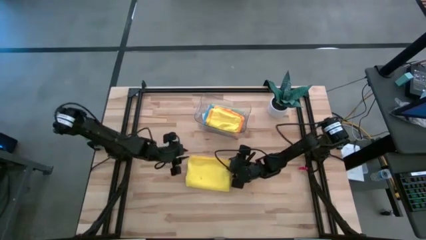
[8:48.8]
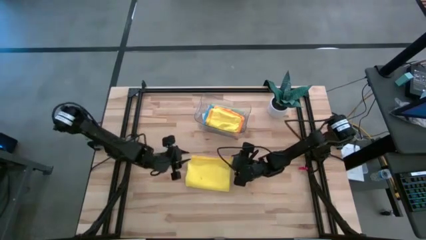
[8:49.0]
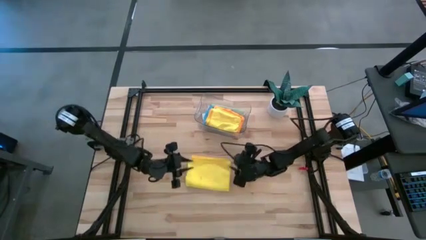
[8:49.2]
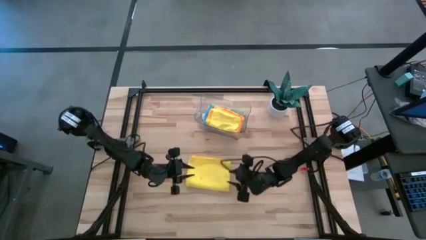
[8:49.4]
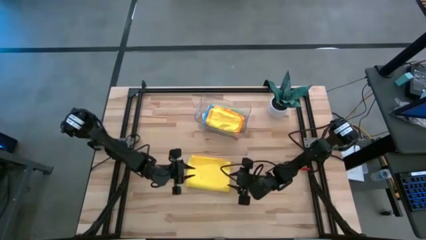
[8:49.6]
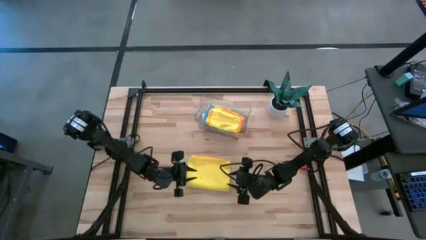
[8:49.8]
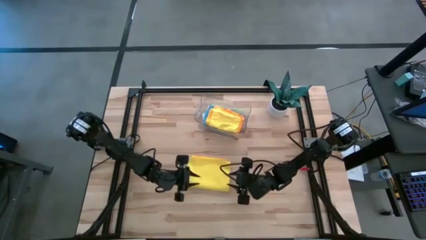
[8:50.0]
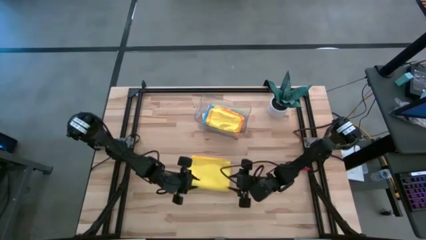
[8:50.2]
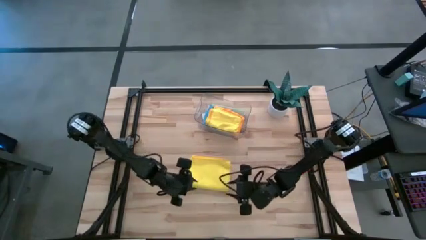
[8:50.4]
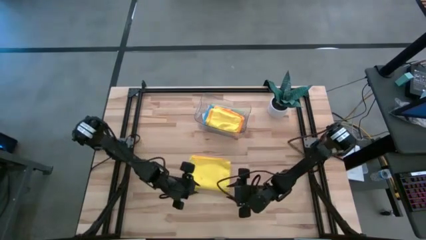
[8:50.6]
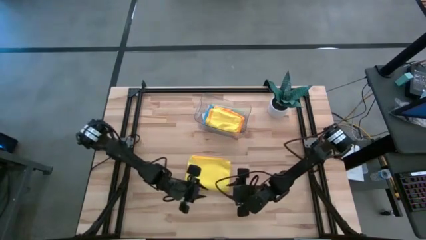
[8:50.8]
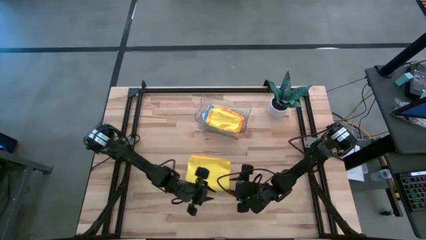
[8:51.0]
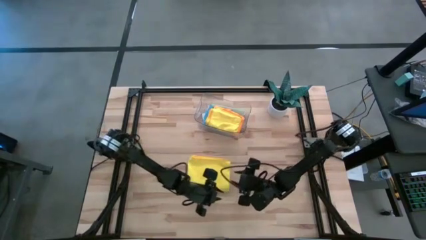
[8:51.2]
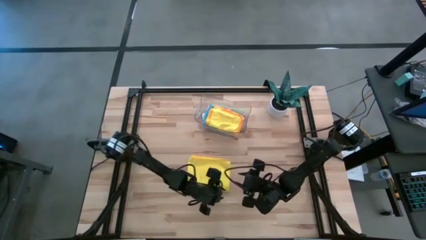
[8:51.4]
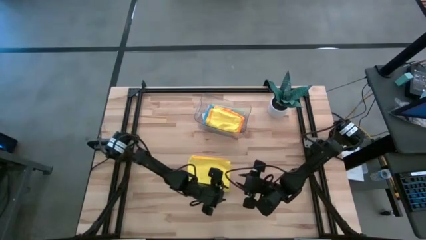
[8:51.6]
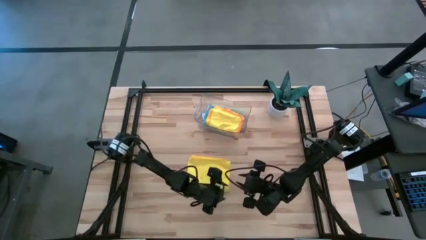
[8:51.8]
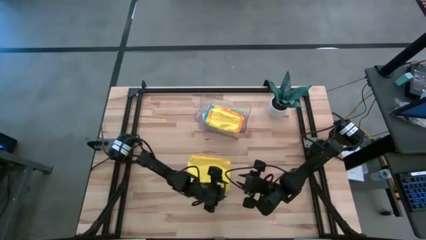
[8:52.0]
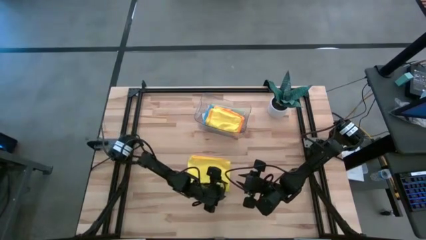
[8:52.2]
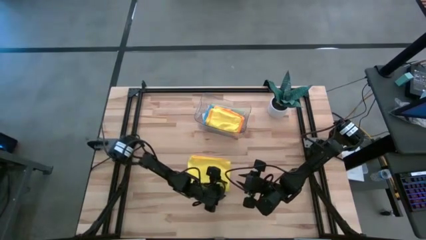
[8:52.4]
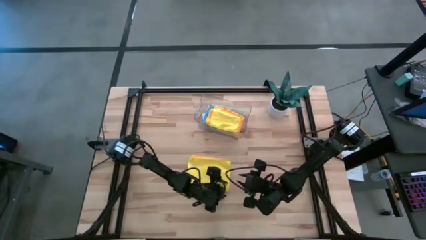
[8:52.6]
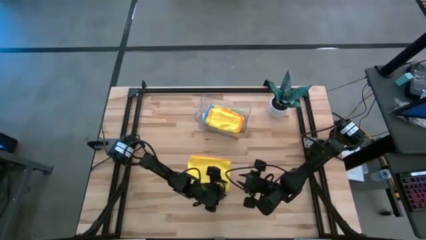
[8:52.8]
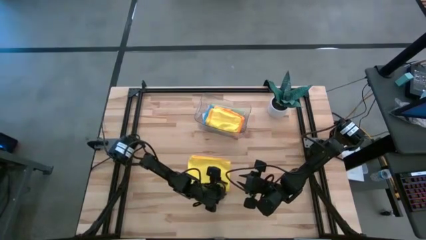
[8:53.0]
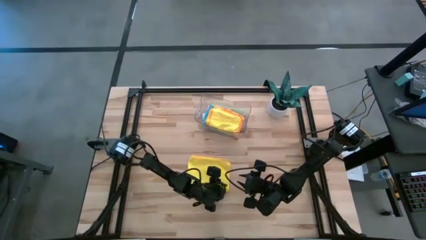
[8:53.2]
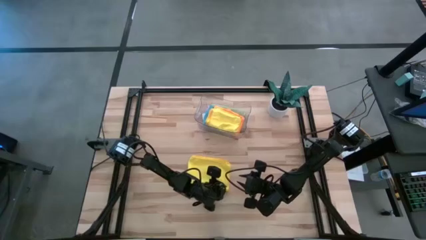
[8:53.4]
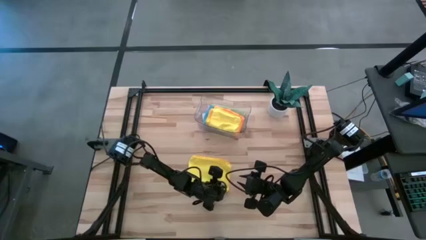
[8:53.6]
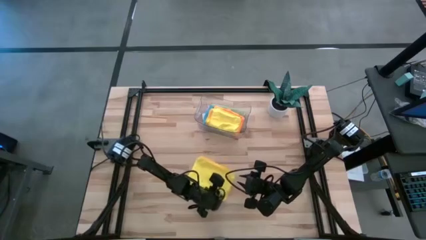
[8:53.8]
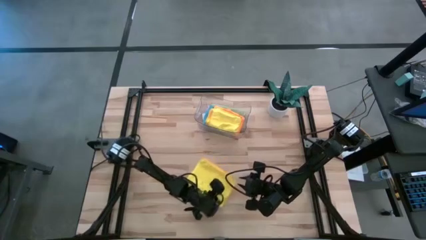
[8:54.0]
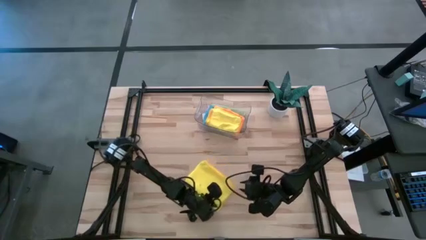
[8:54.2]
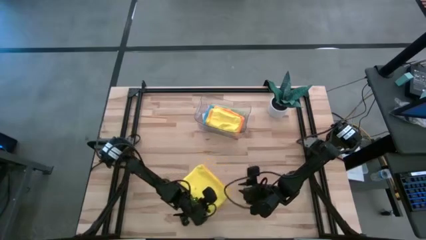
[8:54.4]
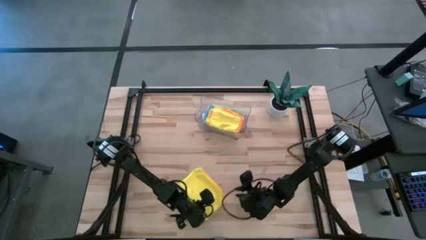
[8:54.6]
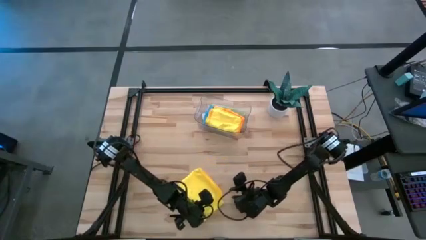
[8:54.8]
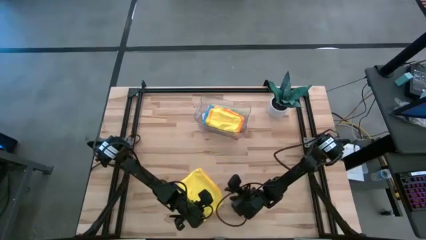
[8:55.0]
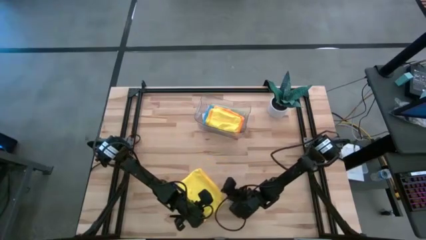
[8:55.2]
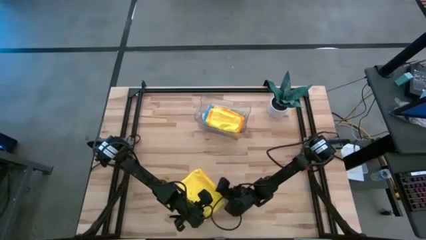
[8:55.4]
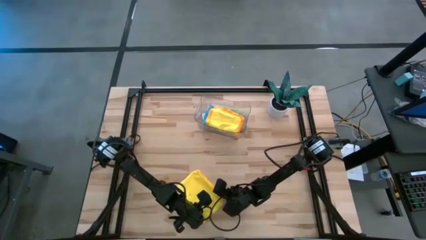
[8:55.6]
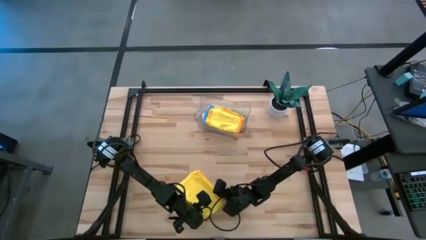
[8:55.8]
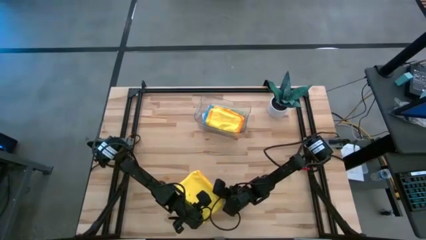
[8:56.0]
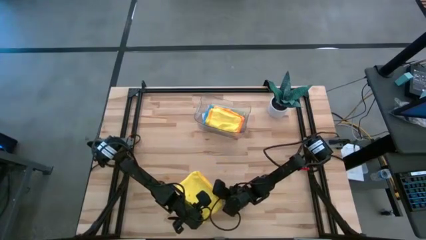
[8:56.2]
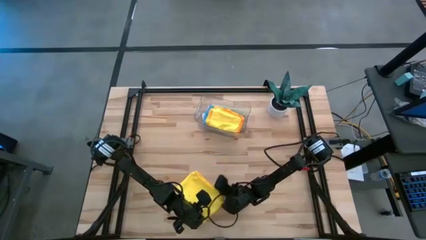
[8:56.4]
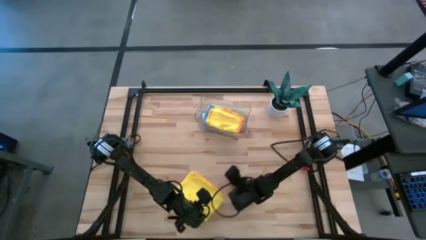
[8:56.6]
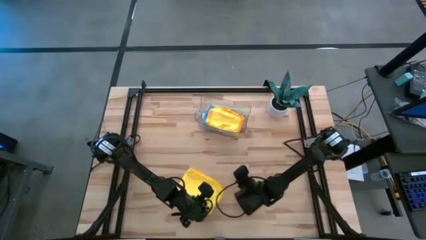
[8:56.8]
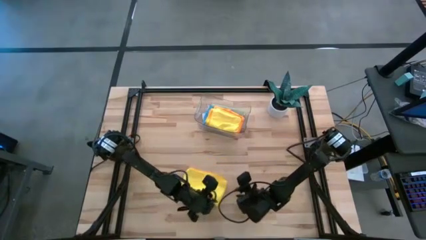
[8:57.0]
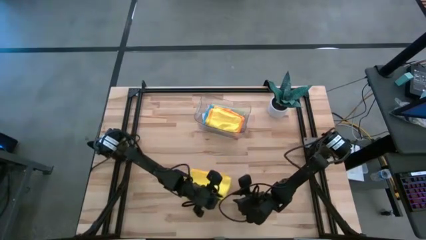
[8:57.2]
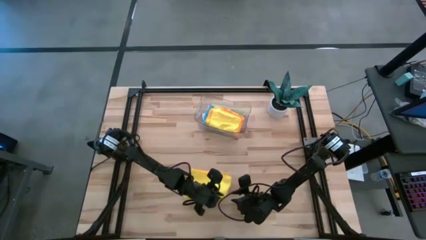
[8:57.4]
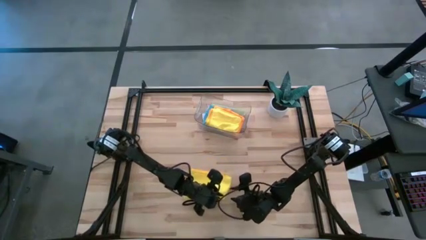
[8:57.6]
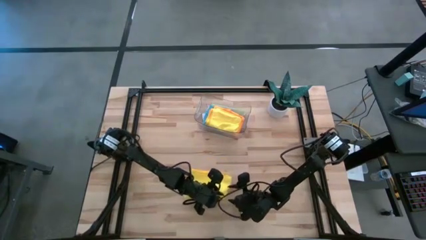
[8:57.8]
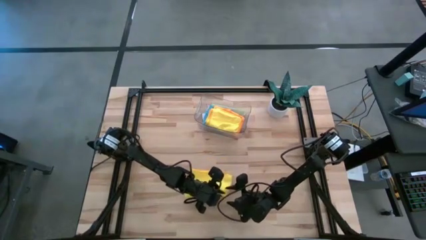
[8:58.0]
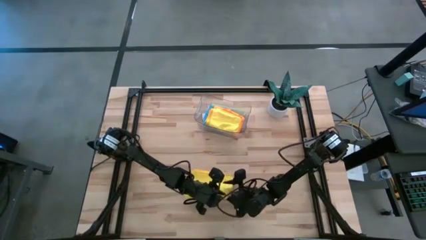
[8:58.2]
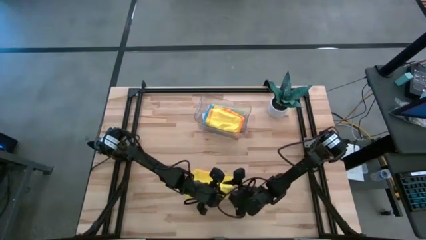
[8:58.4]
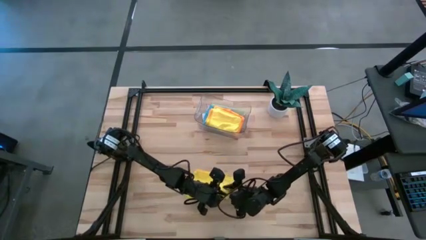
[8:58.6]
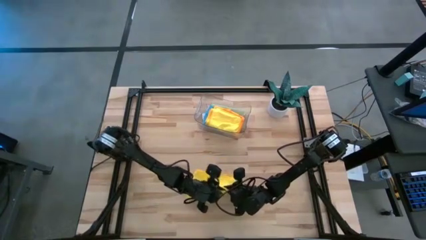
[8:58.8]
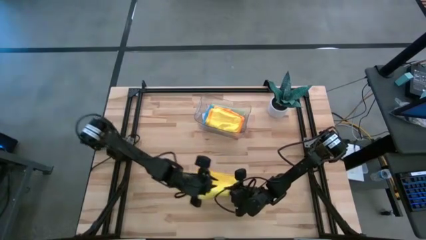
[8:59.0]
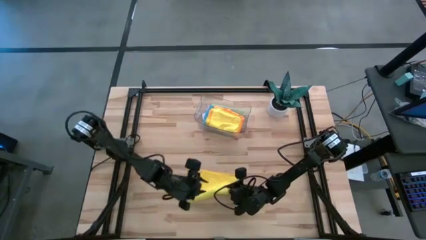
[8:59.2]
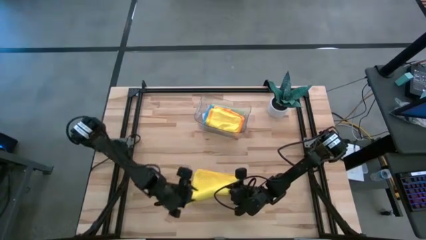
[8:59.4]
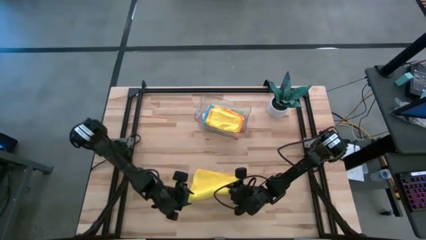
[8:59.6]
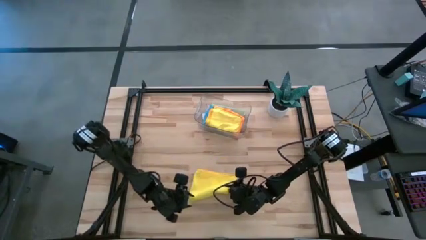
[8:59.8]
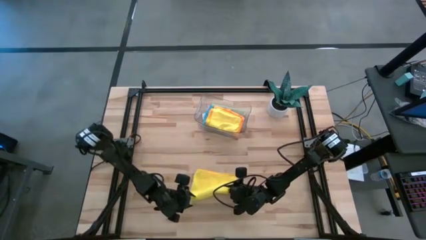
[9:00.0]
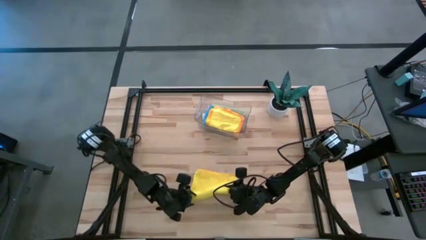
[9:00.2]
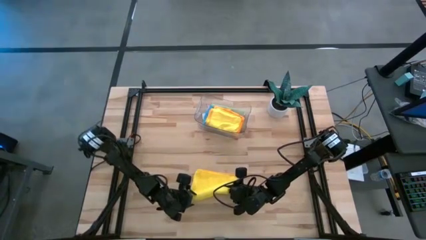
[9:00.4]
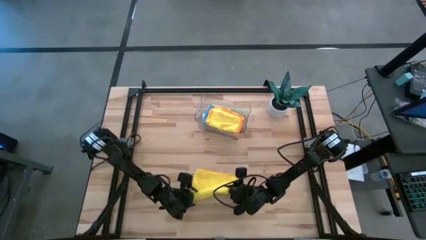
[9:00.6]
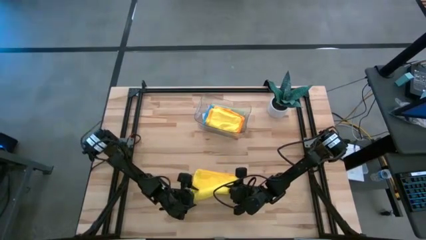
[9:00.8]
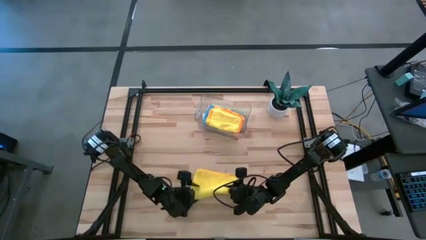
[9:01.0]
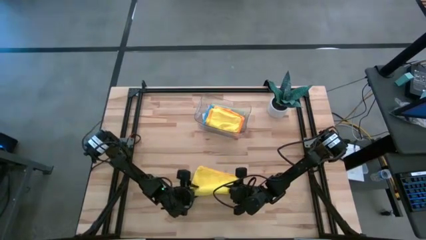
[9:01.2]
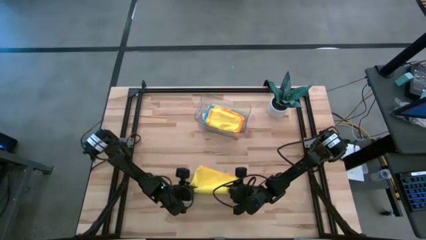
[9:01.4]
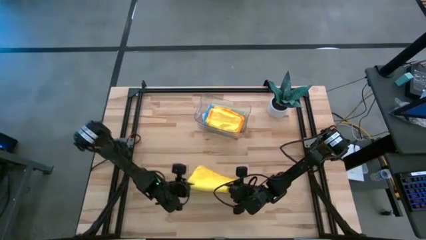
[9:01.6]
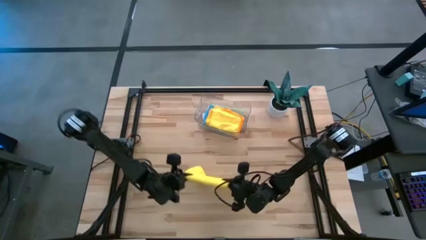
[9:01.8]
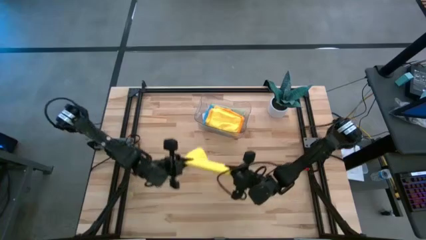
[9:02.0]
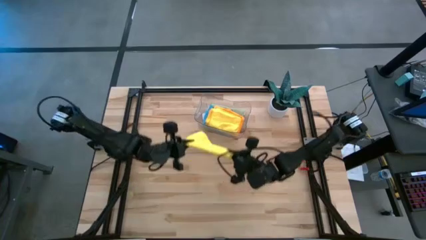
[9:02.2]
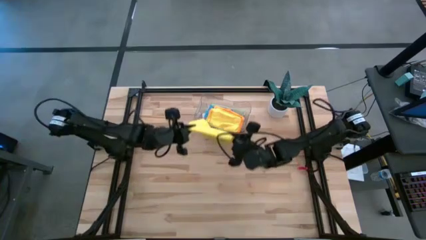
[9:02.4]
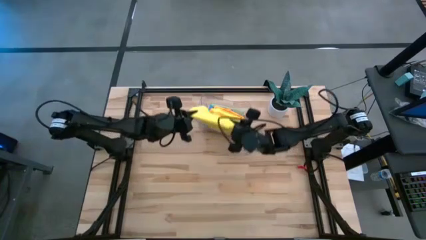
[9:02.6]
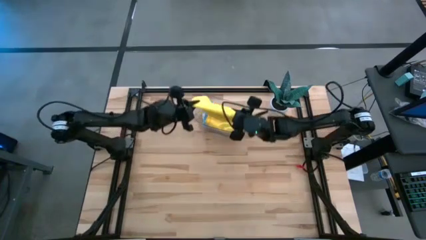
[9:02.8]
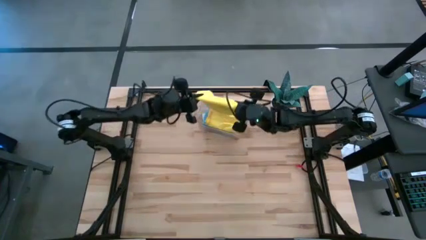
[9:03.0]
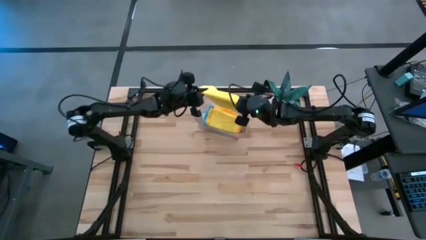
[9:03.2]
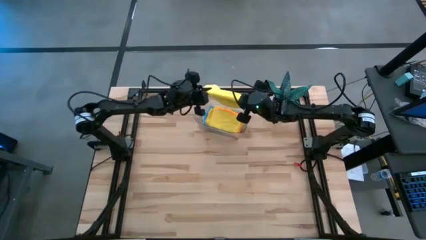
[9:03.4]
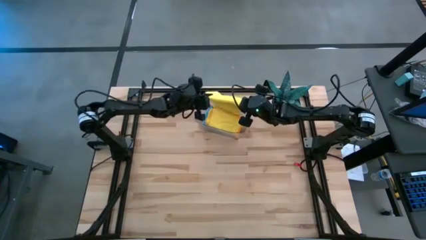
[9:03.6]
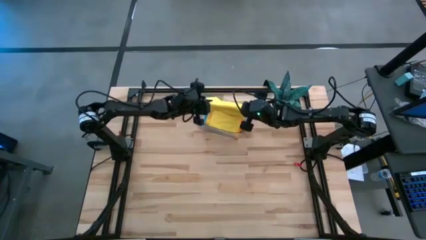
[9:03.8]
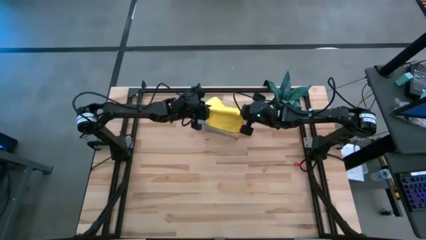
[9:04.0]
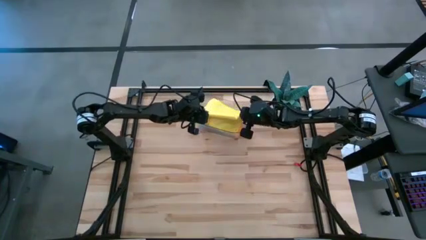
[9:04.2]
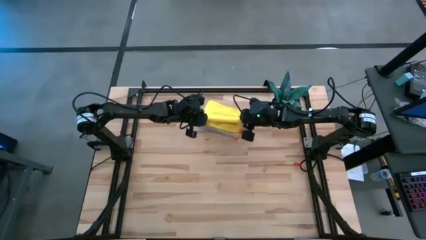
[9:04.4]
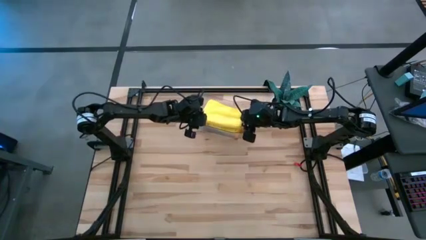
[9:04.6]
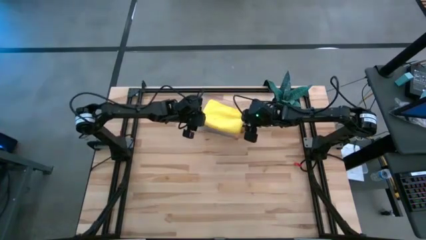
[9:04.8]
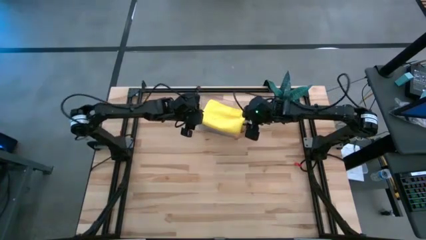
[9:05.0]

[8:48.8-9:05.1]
Task: Fold microfiber towels
Put the yellow folded towel into the transparent bin
